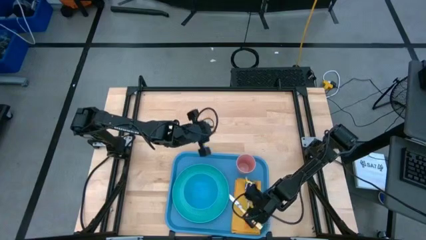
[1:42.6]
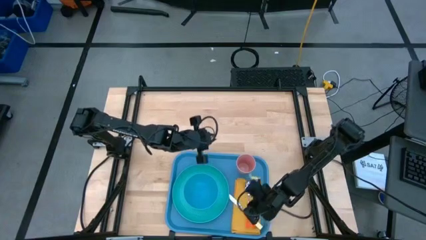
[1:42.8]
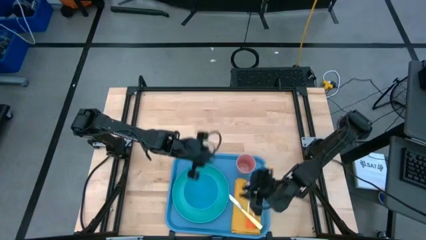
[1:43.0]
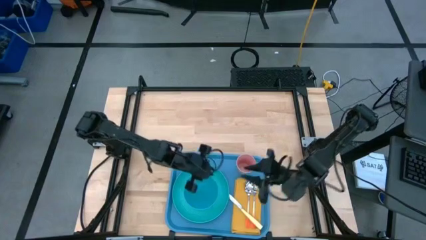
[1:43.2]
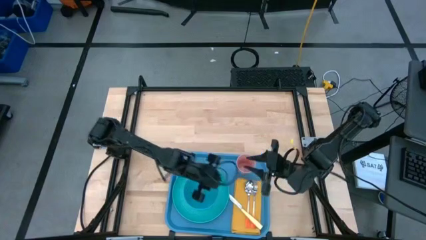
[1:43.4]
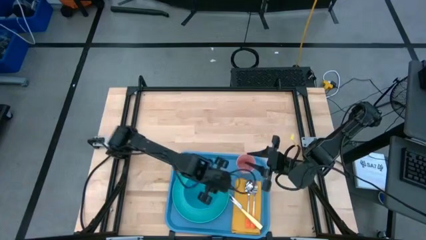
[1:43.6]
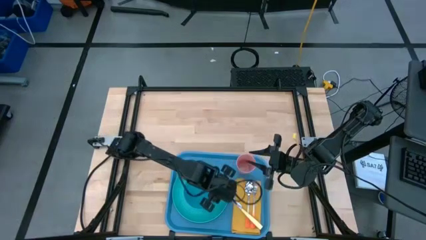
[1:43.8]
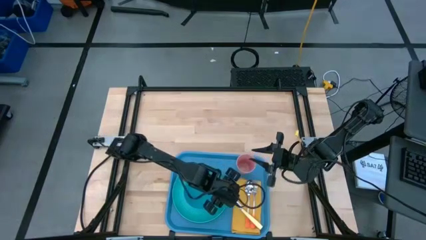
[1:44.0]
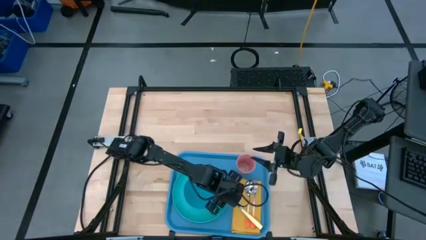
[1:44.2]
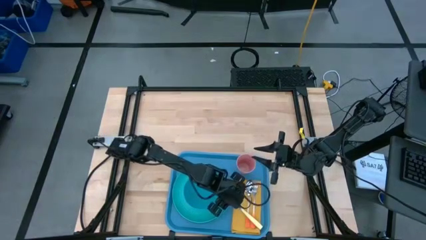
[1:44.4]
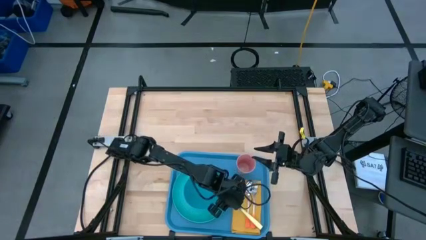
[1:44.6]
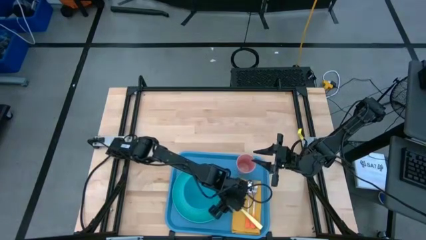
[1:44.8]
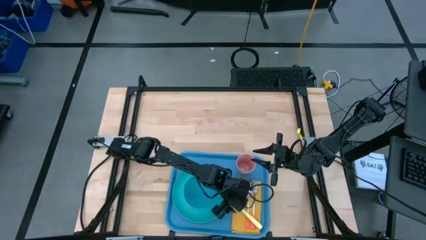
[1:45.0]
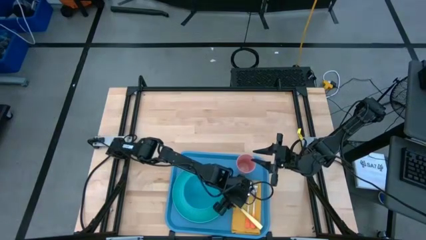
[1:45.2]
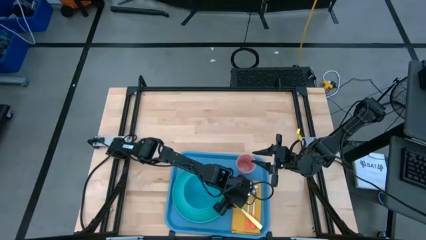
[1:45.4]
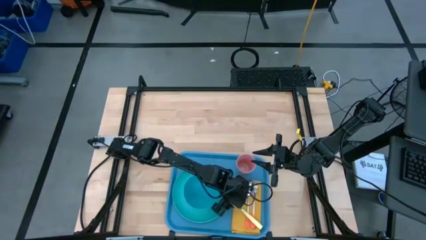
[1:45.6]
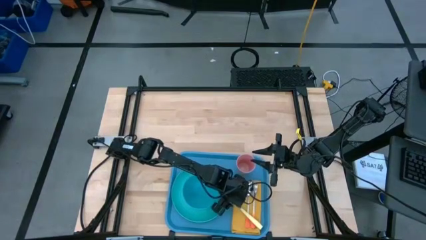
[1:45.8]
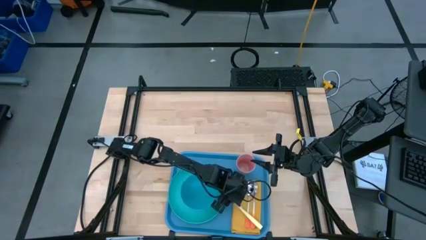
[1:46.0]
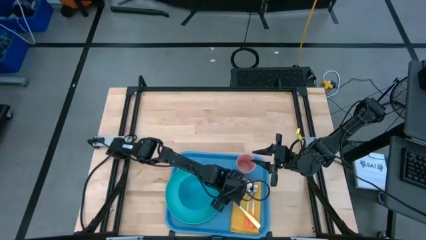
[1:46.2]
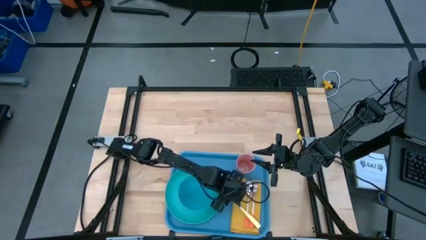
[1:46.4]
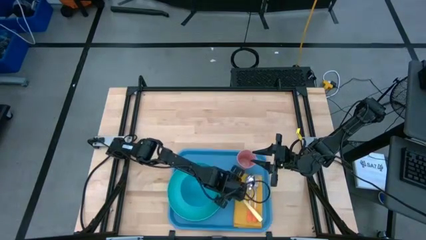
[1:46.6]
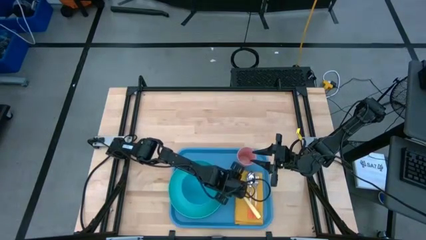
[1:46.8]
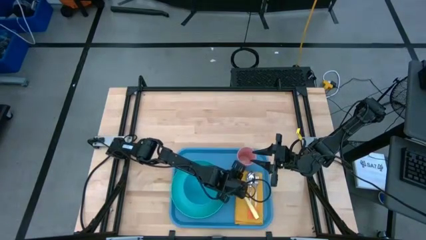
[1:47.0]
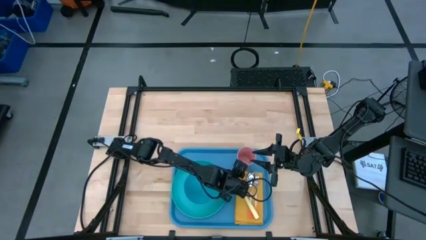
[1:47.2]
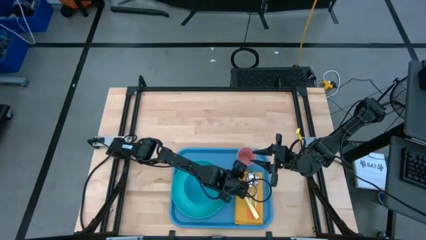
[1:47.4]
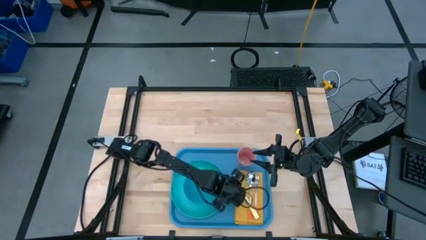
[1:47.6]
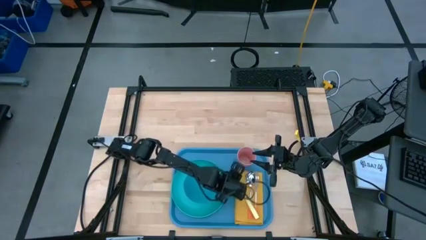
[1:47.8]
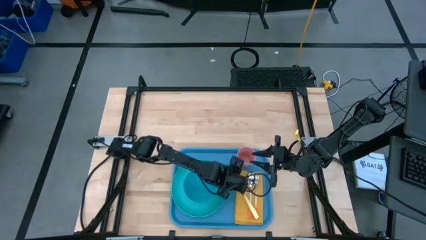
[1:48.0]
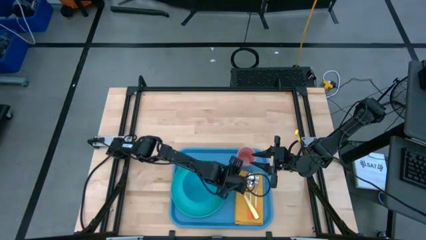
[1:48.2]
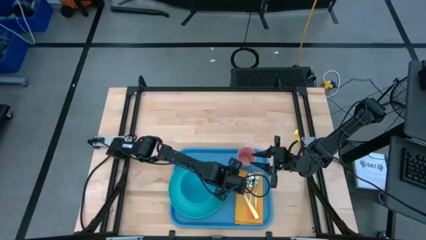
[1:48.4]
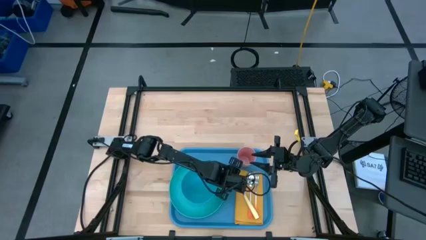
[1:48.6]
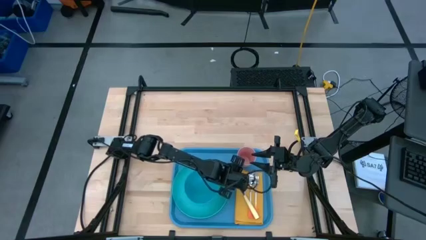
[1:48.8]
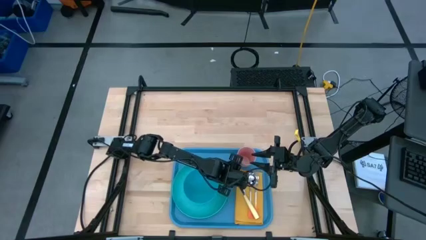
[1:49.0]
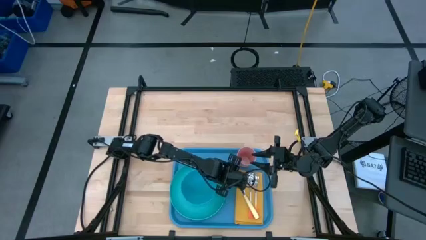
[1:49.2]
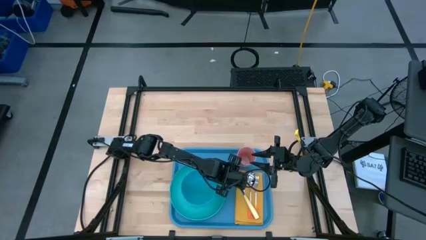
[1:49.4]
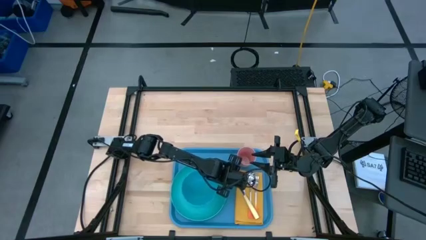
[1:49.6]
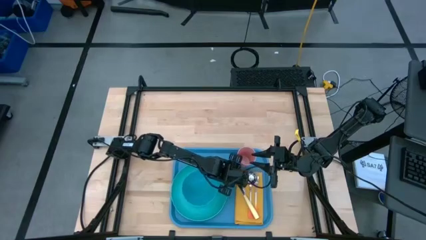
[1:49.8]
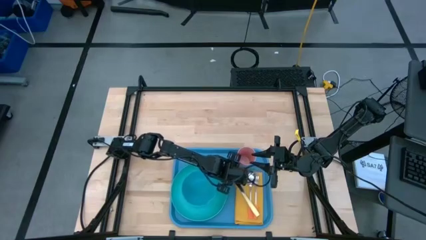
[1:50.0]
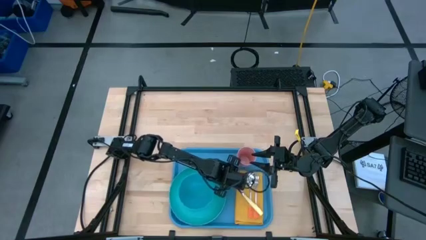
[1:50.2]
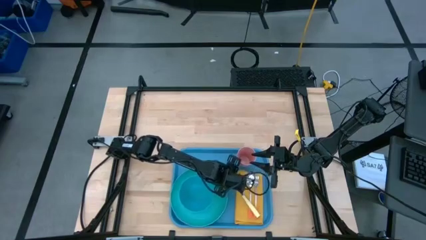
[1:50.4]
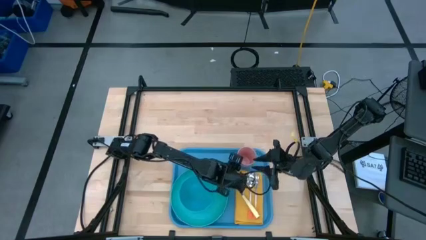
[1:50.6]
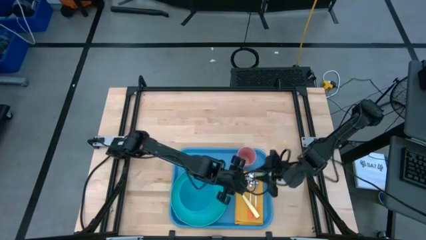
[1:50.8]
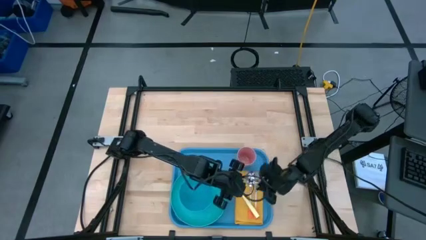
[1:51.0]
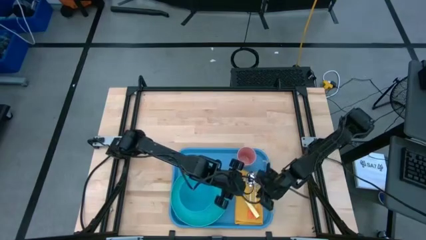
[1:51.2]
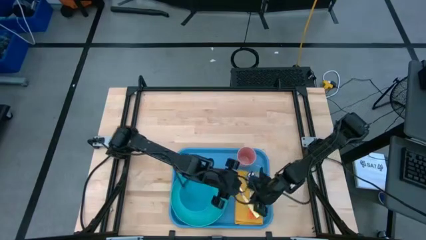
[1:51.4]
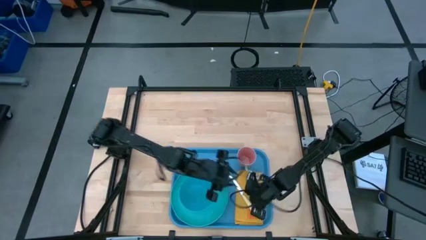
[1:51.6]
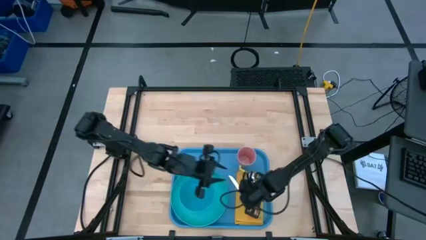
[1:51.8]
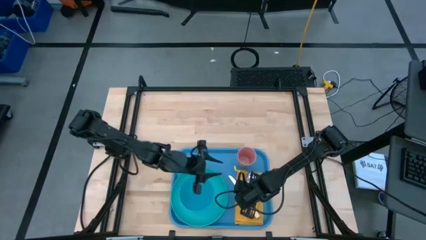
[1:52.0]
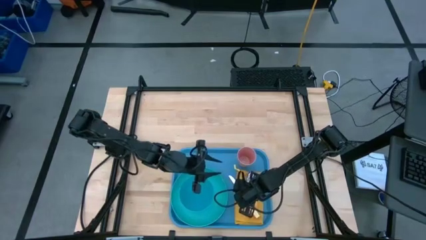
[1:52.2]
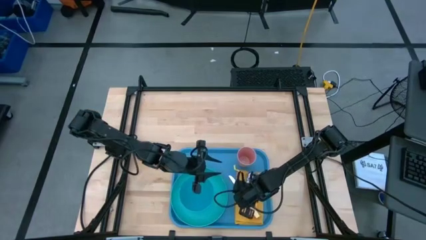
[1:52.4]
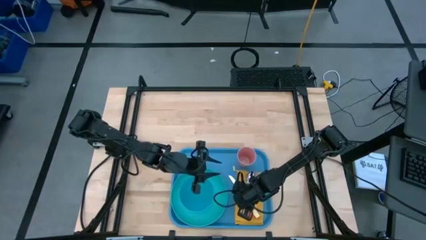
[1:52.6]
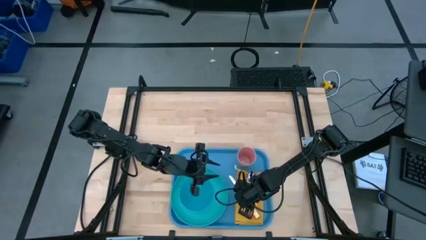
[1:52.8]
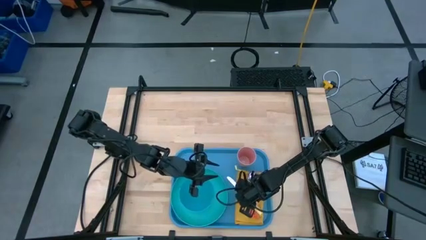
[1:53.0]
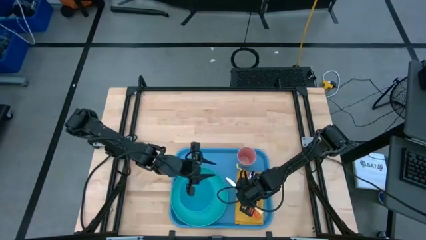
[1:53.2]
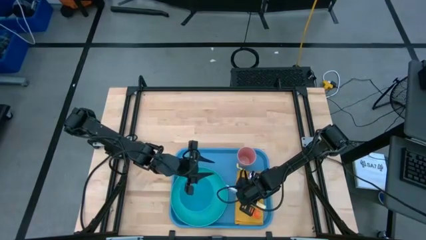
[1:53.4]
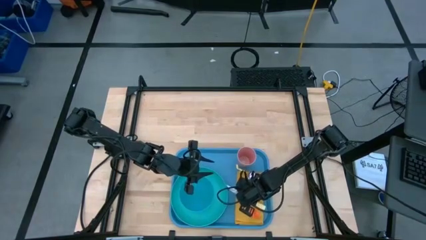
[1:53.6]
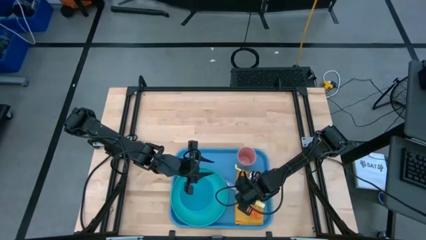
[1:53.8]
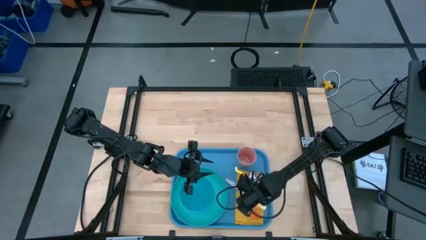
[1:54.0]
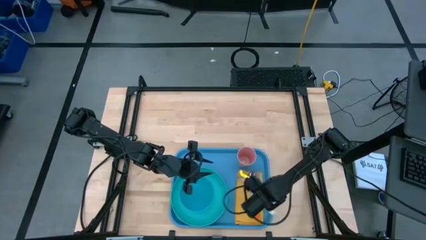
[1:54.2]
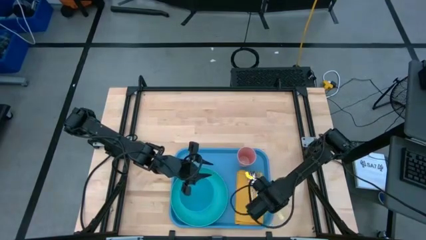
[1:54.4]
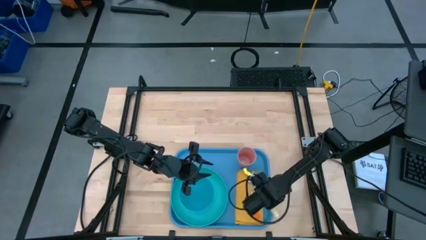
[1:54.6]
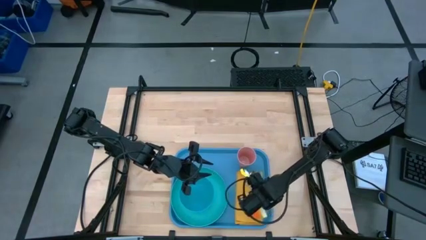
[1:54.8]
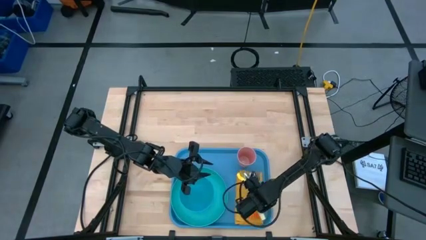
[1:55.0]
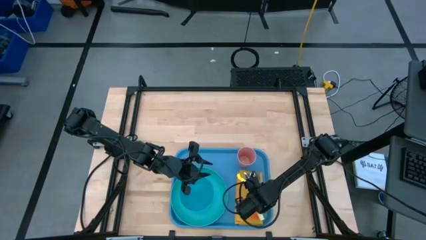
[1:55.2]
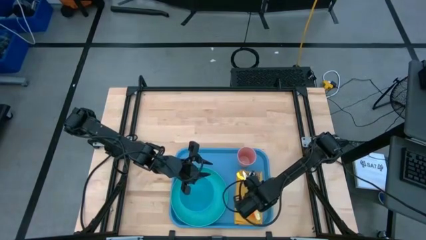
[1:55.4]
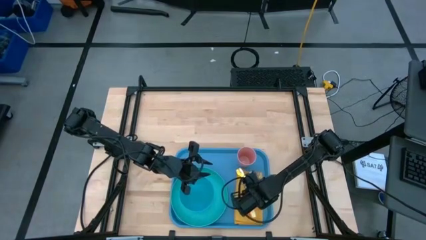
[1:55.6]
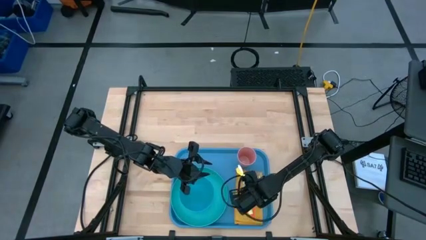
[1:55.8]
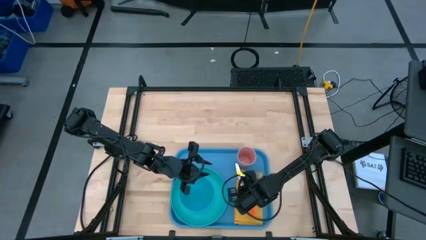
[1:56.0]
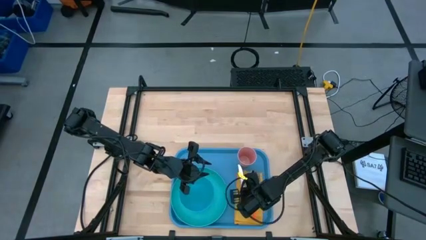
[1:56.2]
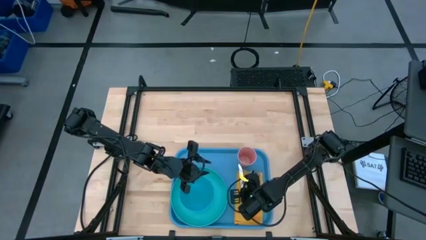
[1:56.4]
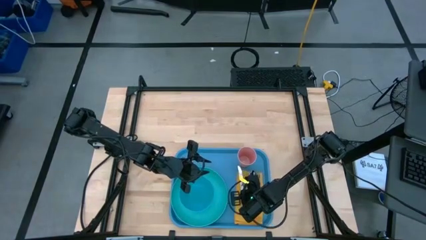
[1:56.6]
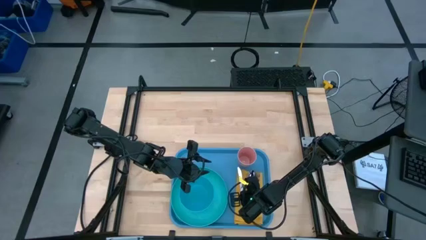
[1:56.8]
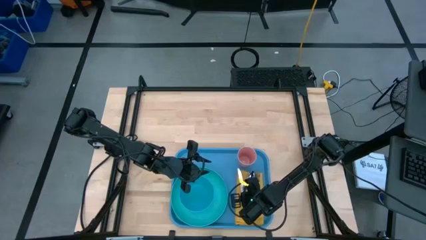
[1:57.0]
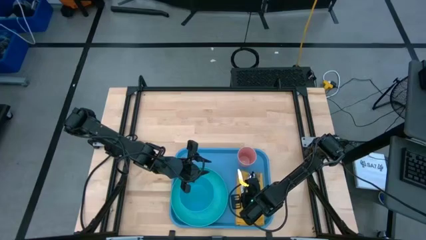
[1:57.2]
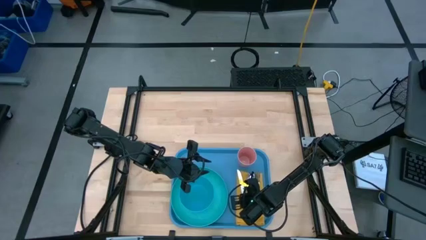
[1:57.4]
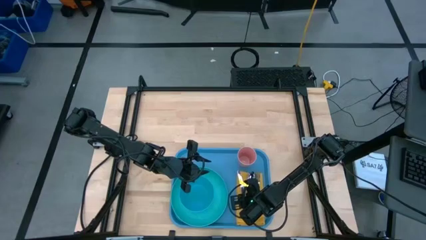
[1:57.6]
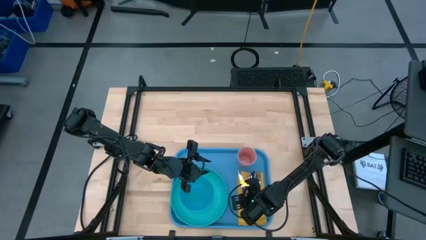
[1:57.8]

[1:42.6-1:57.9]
Task: Set up tray
Put the yellow knife on the yellow napkin to the left of the orange spoon

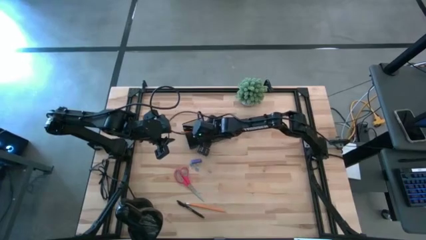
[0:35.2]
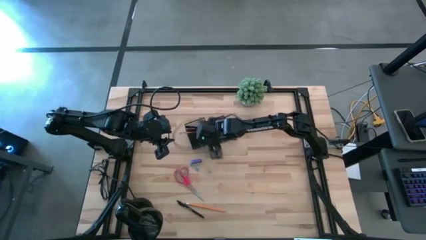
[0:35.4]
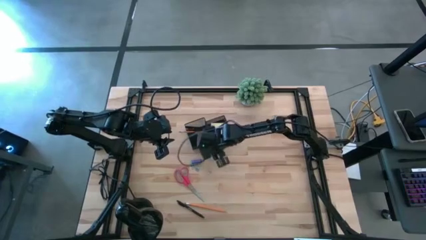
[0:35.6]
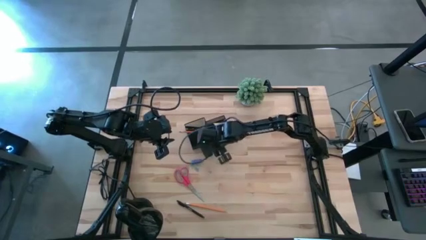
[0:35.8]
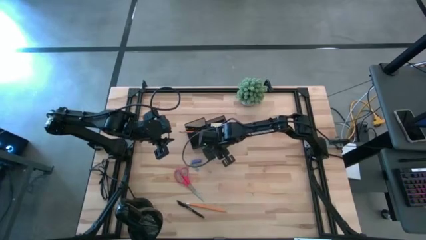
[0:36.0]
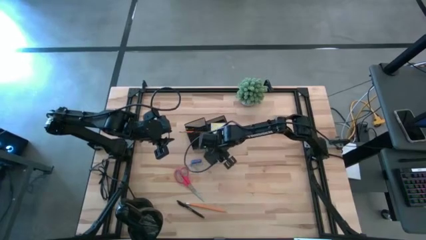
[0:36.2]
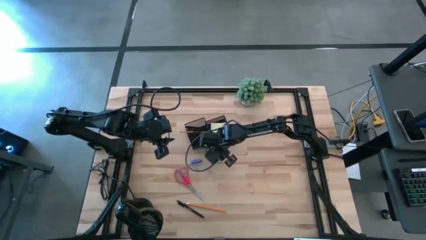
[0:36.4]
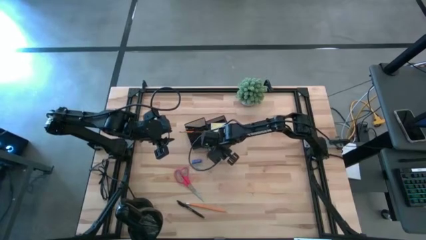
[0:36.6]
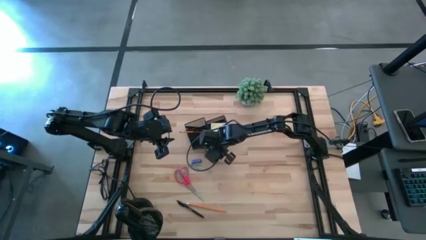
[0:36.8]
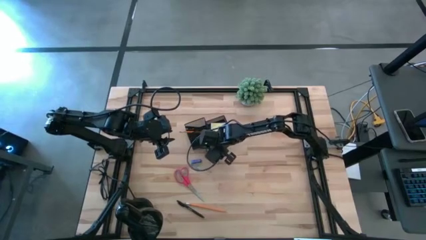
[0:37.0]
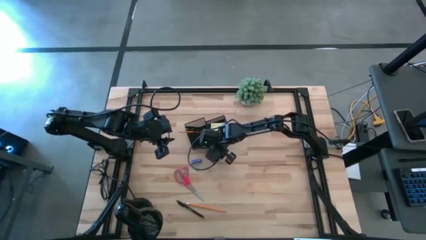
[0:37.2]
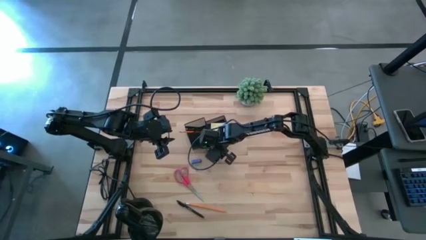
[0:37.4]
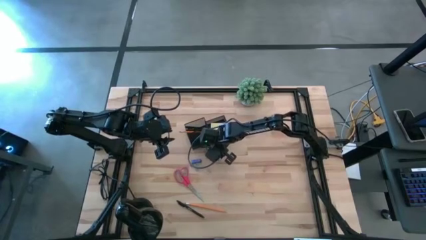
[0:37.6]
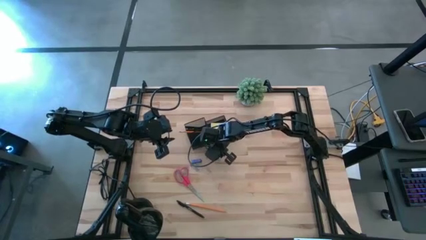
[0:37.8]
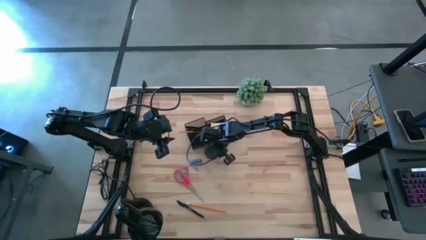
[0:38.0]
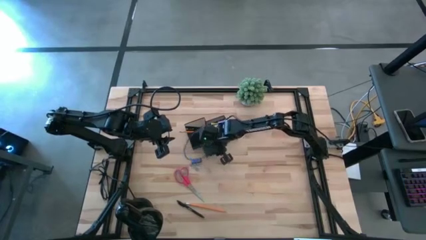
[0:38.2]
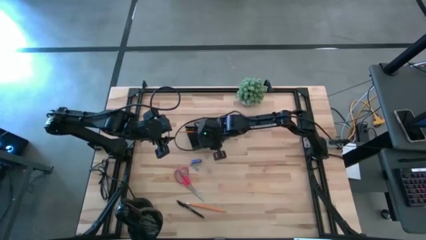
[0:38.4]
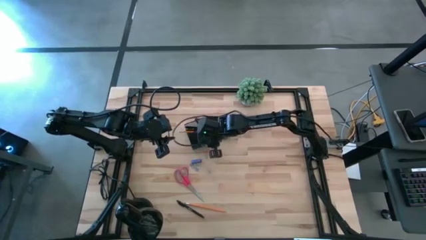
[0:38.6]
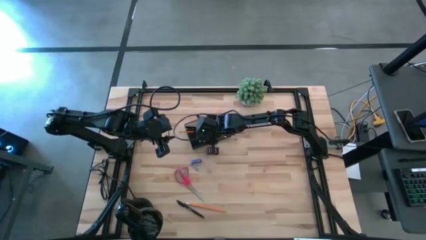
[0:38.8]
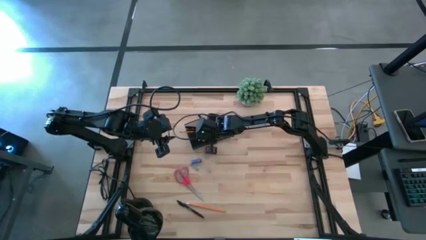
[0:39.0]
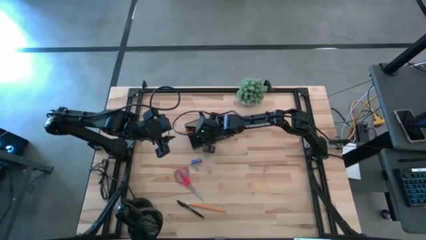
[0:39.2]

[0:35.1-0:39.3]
Task: Pick and place office supplies into organizer
Put the top brown binder clip into the desk organizer
